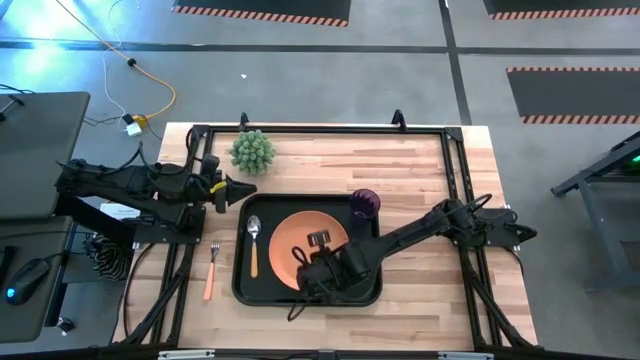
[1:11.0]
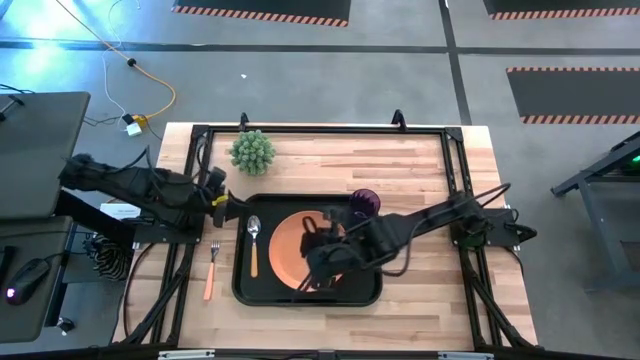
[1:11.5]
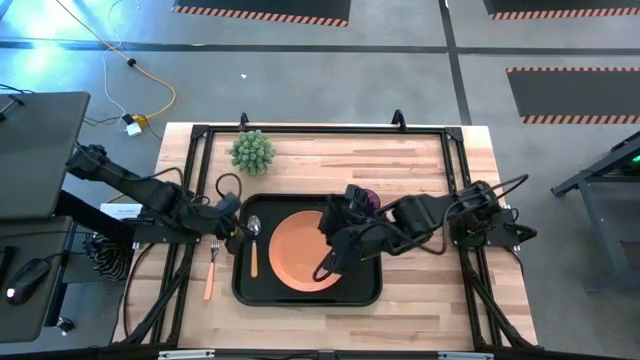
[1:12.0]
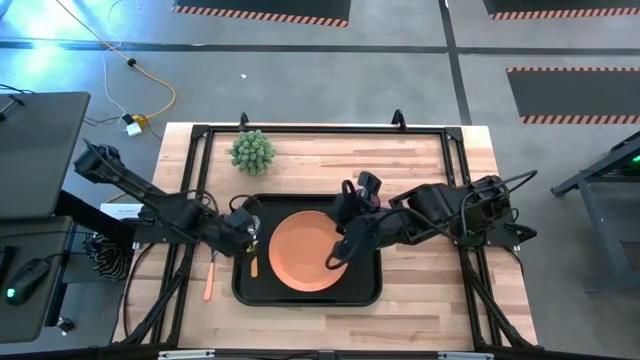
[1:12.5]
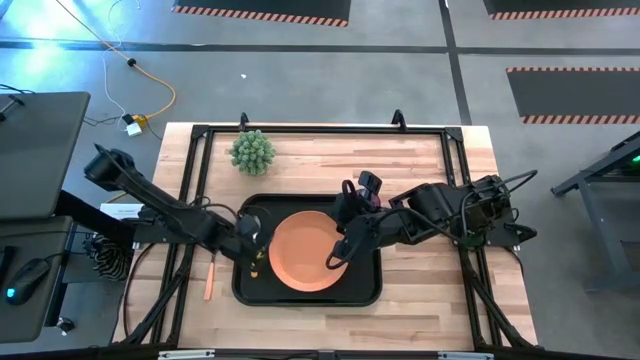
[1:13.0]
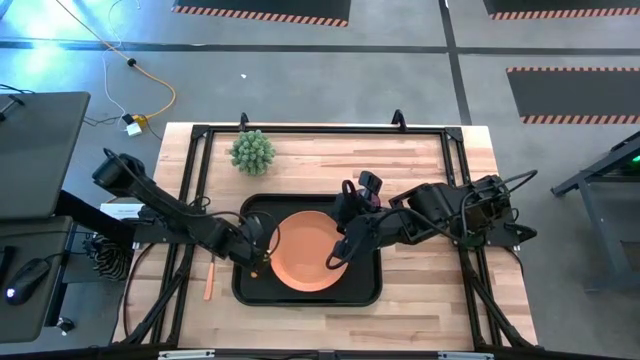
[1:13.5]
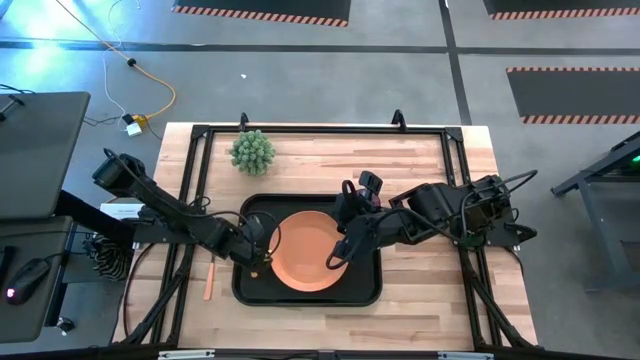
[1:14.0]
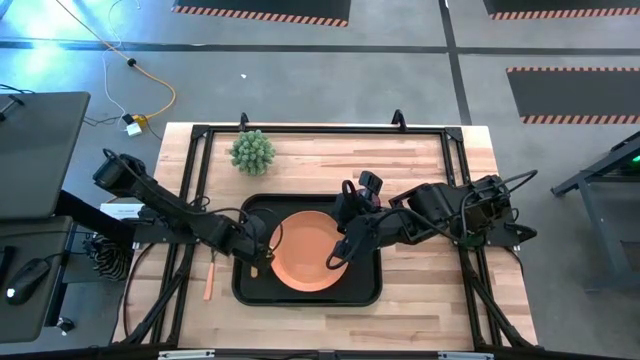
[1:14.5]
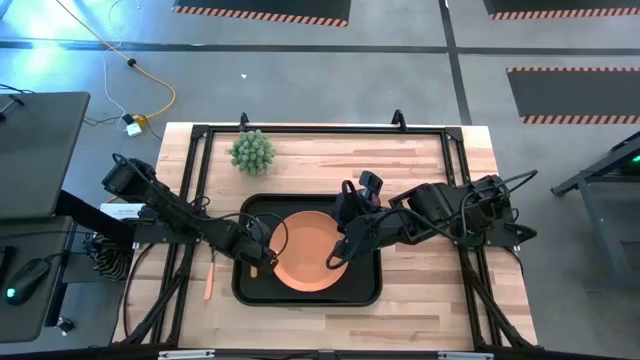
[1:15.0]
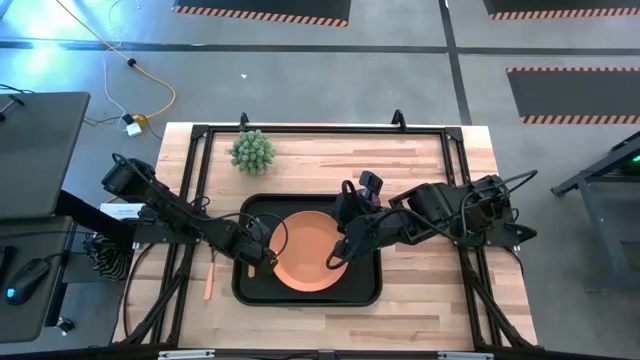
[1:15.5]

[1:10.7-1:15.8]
Task: Pick and place plate/cup/fork/spoon on tray
Adjust the yellow spoon on the tray

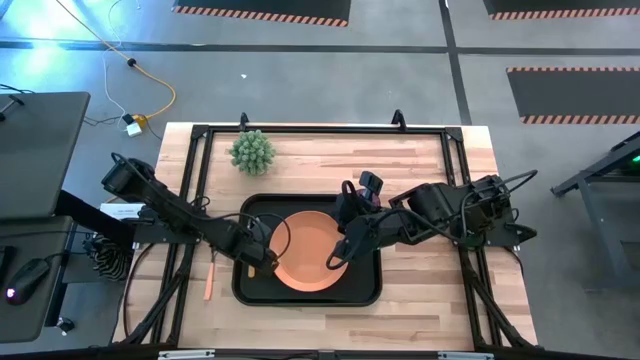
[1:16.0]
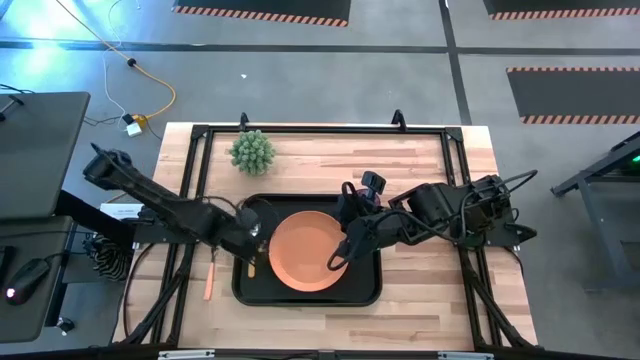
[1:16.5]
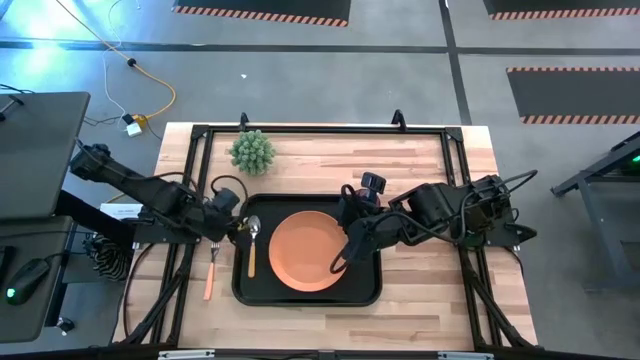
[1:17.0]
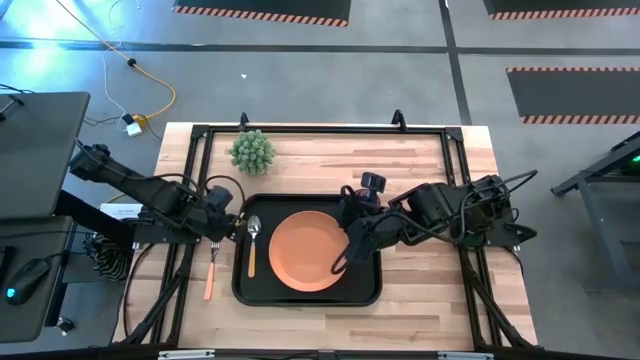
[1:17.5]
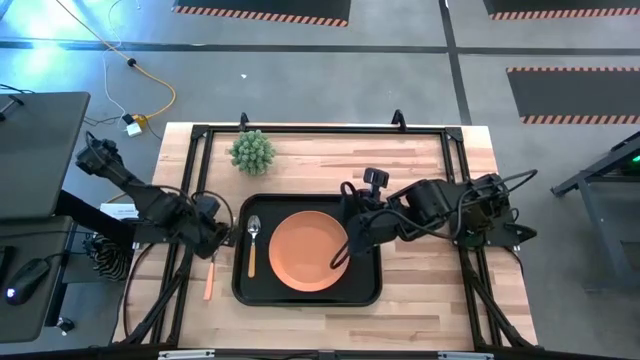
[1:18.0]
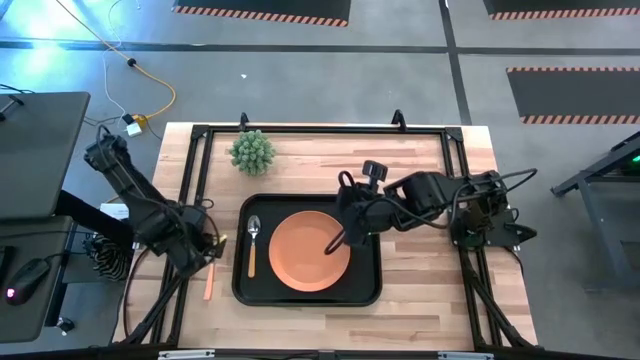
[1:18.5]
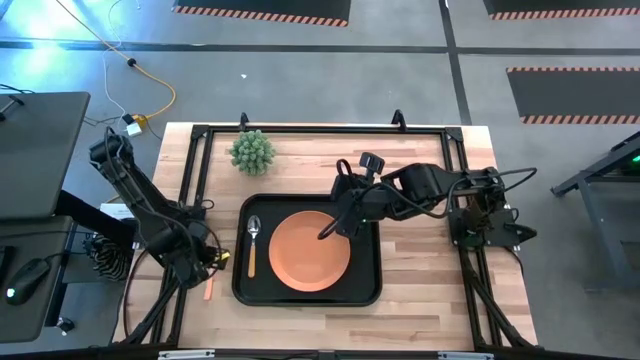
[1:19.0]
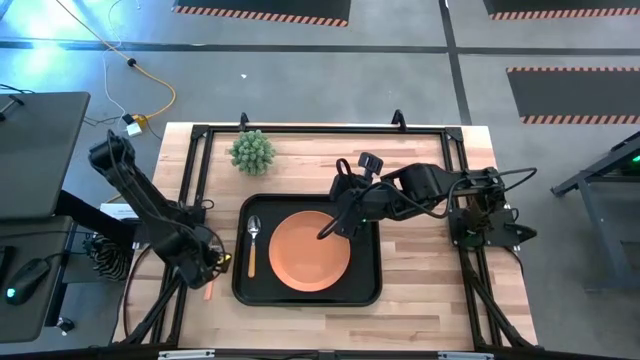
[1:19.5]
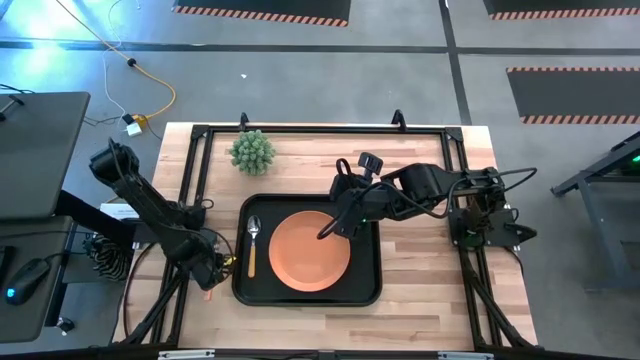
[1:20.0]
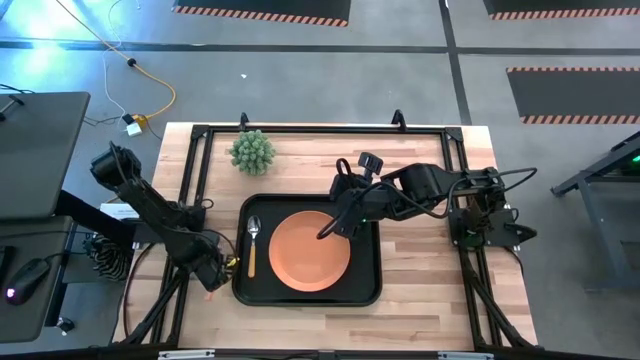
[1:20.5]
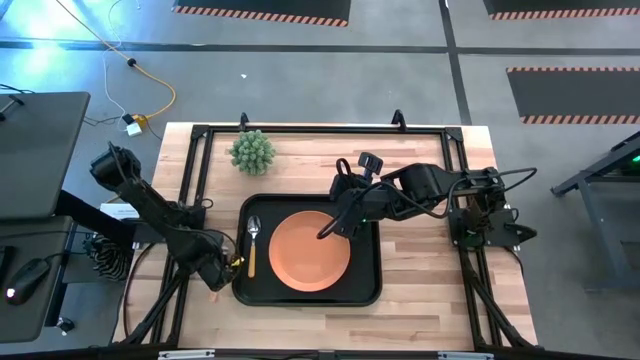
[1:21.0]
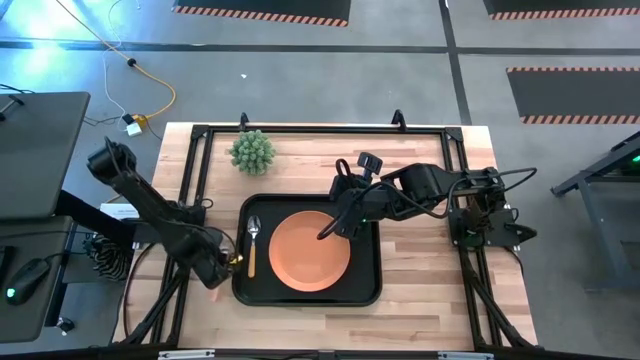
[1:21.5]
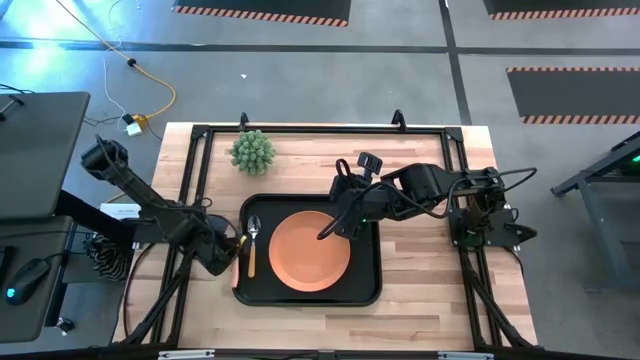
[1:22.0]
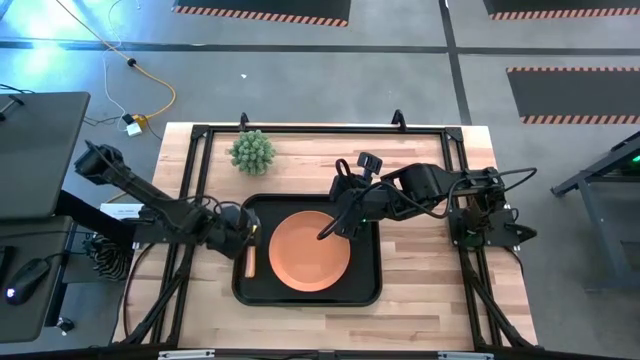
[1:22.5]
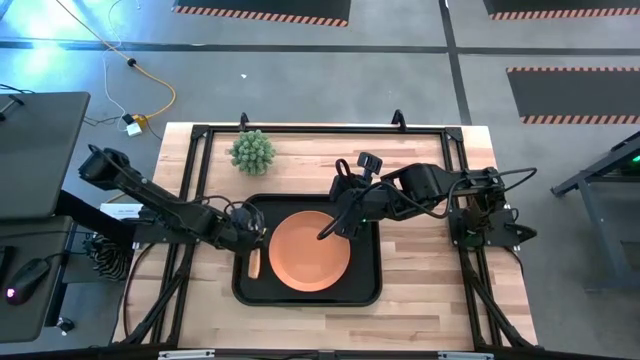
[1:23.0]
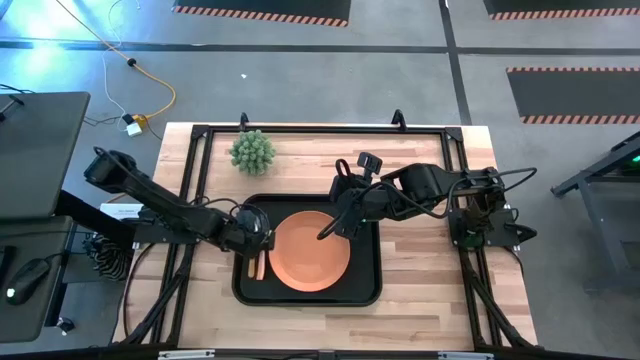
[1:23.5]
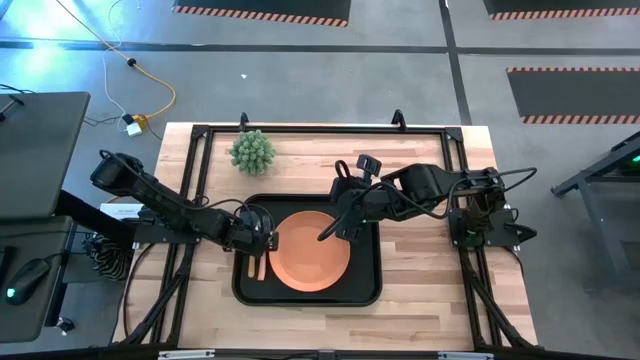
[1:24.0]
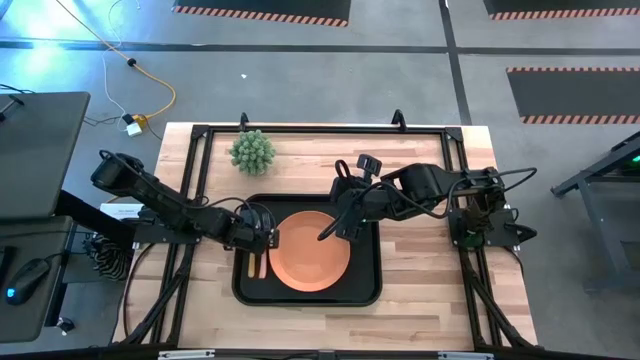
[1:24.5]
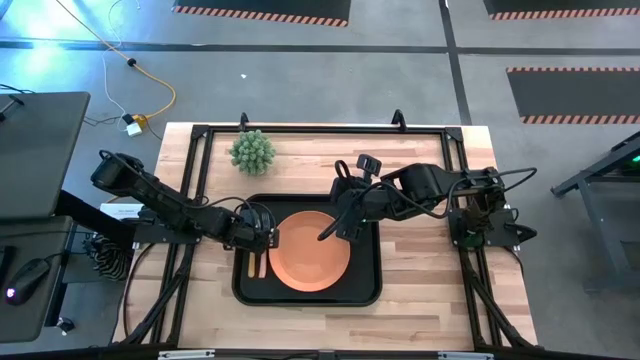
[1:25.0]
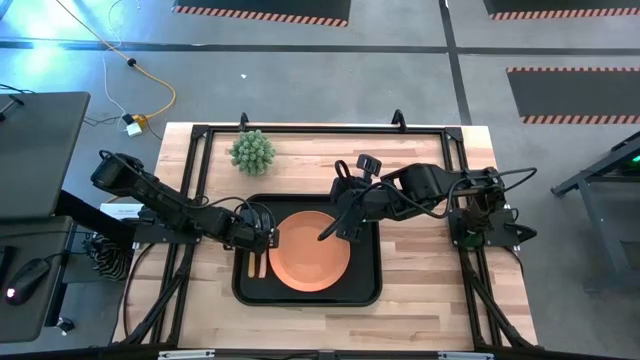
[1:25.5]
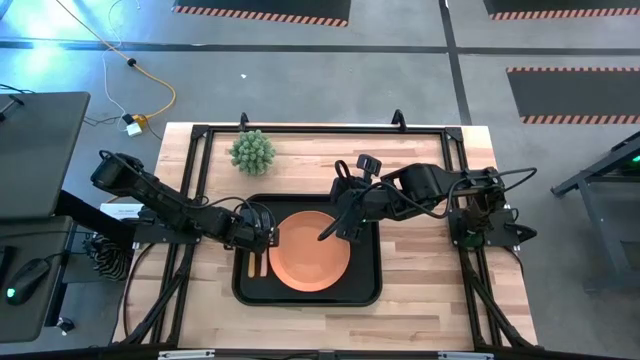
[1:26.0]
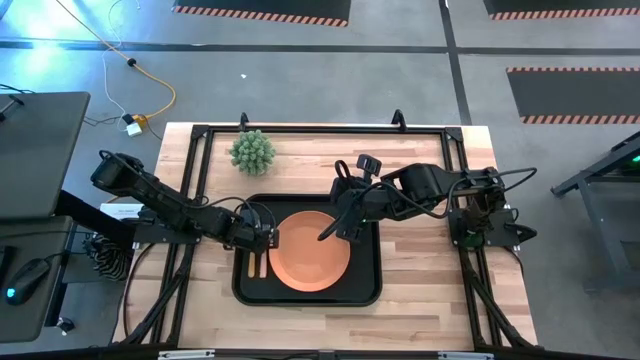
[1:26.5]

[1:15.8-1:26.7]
Put the light orange fork on the black tray to the right of the yellow spoon

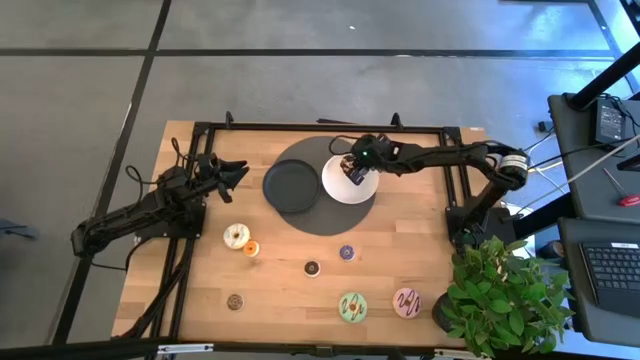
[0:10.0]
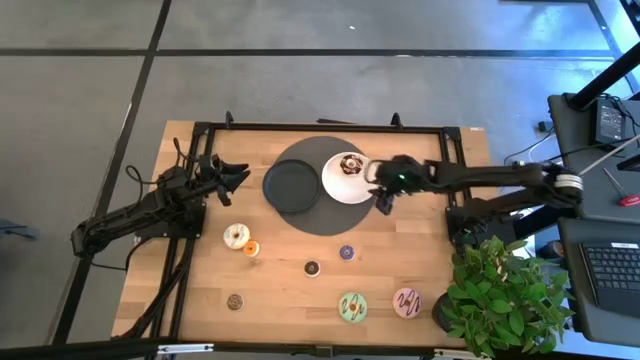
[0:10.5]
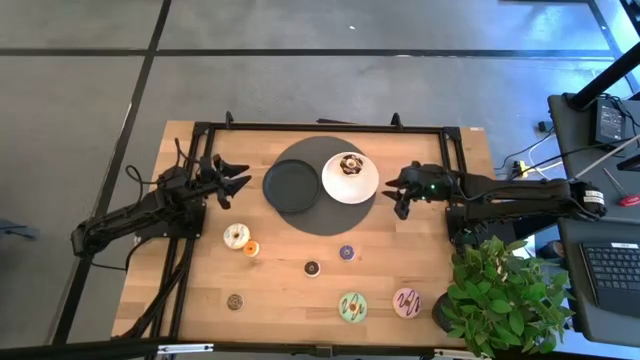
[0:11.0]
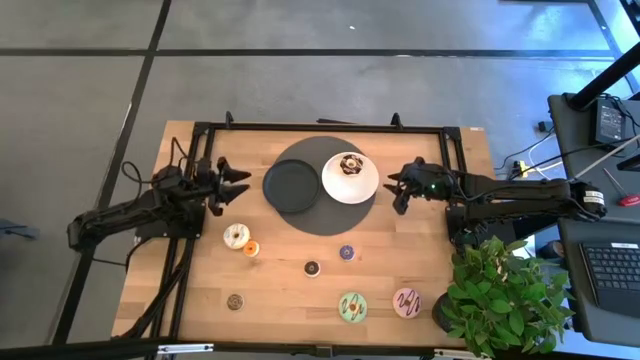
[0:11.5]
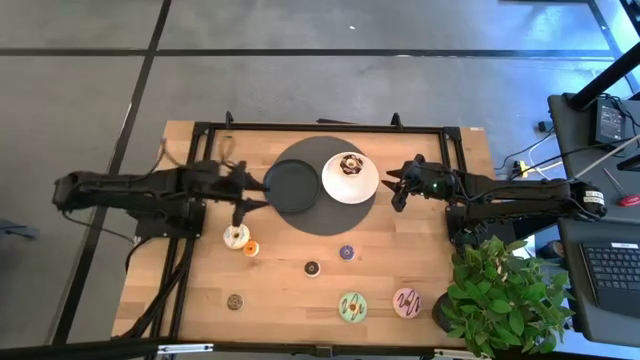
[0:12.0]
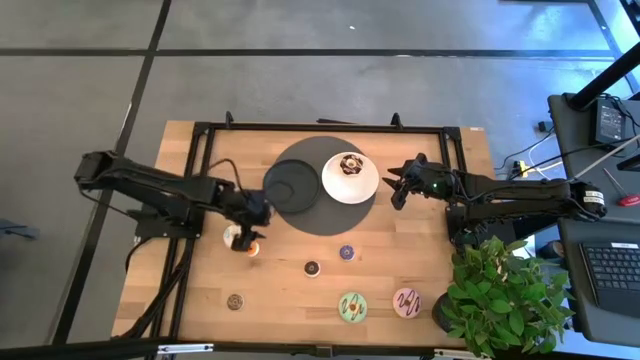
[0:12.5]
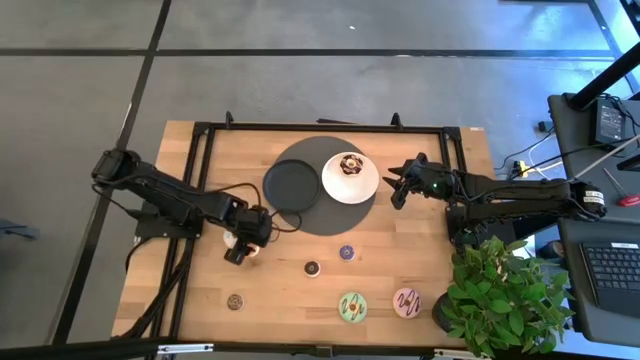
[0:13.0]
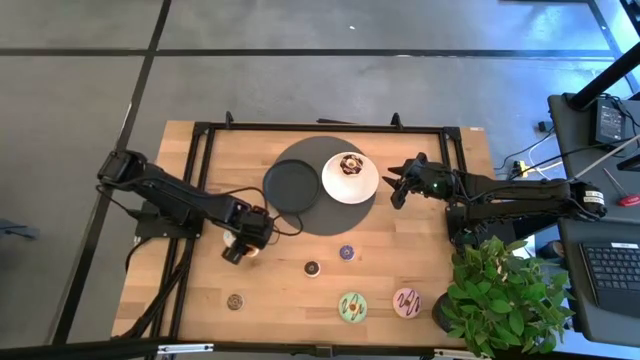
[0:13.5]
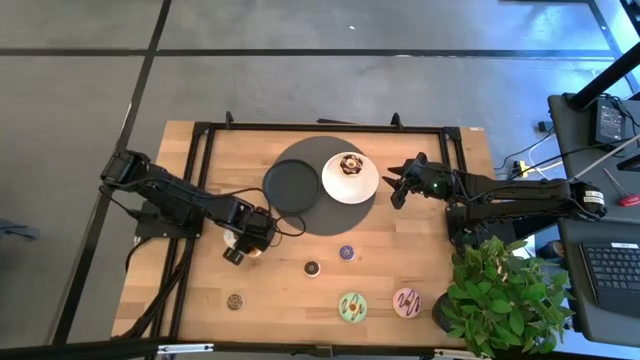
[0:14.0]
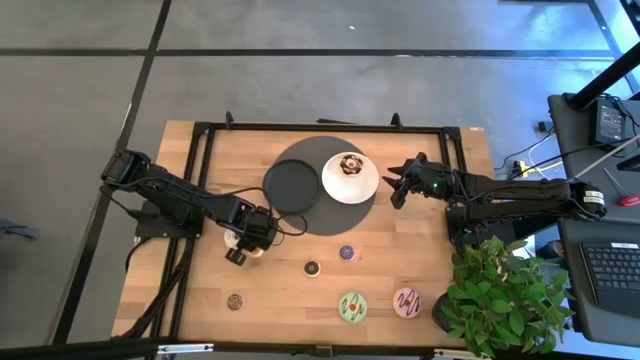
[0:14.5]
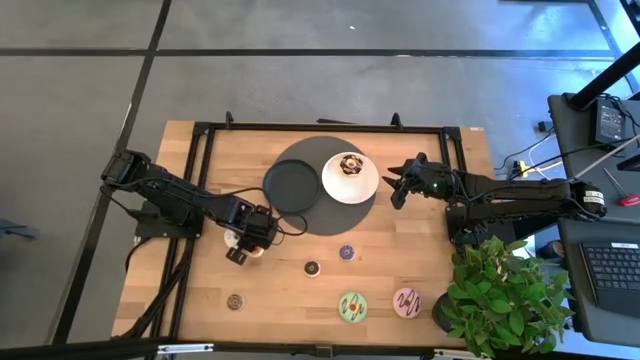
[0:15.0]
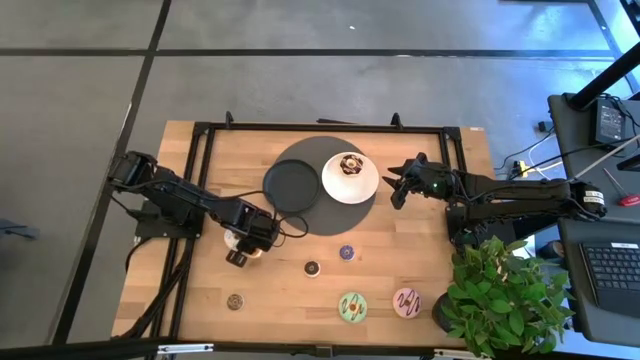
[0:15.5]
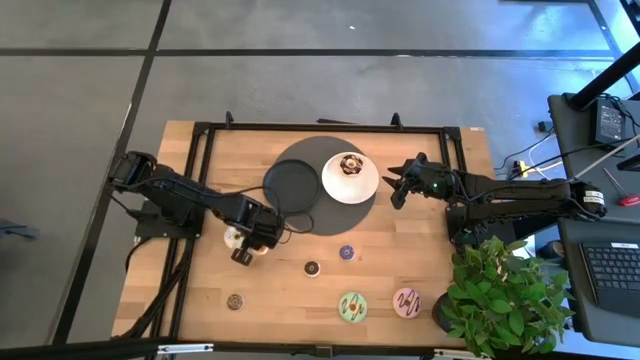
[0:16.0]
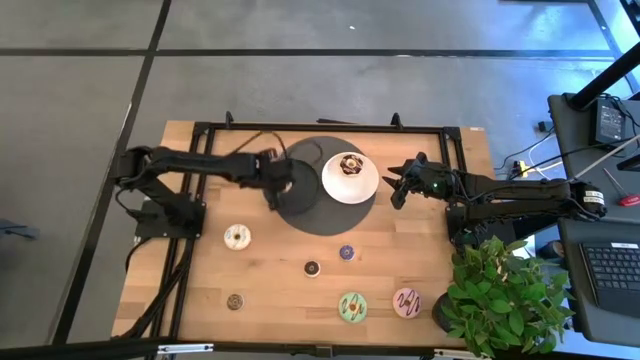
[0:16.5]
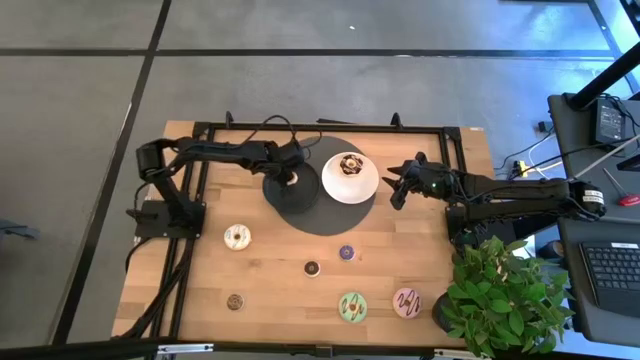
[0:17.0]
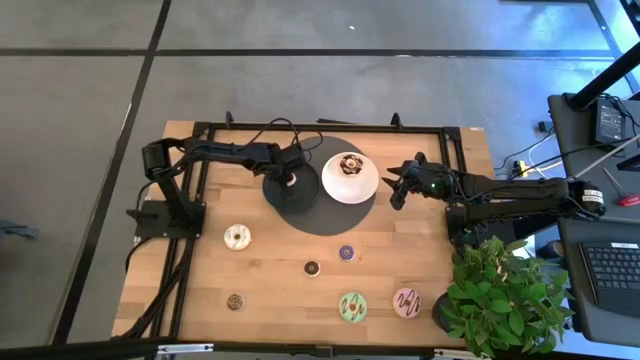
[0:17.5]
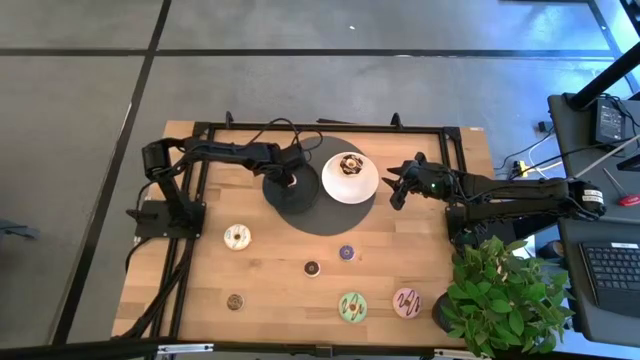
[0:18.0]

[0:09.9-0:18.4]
Task: Pick & Place donuts
Put the small orange donut on the black plate
